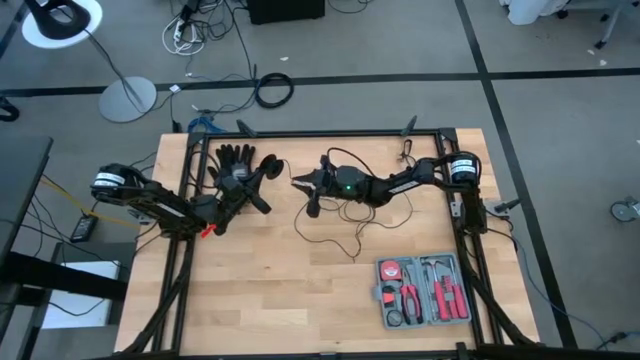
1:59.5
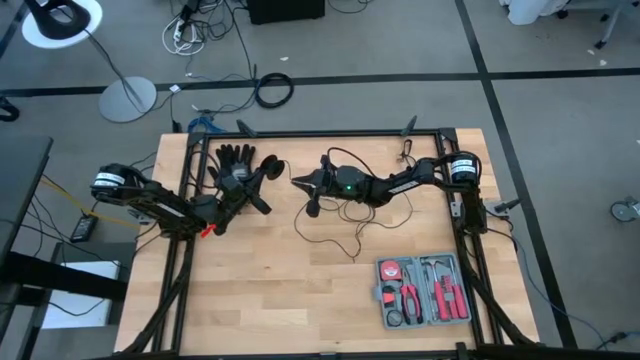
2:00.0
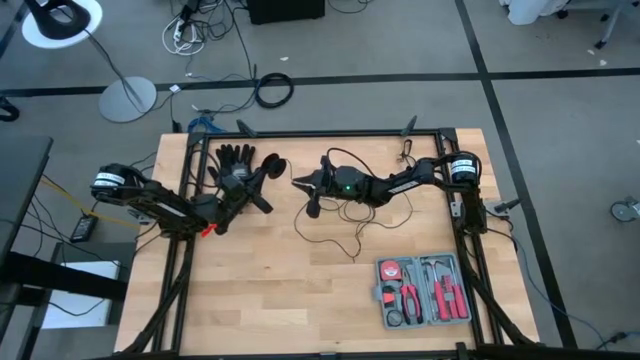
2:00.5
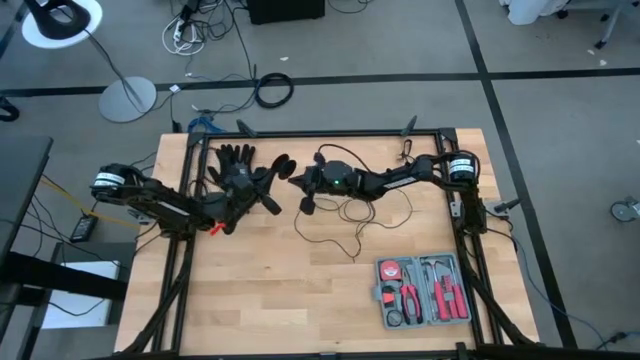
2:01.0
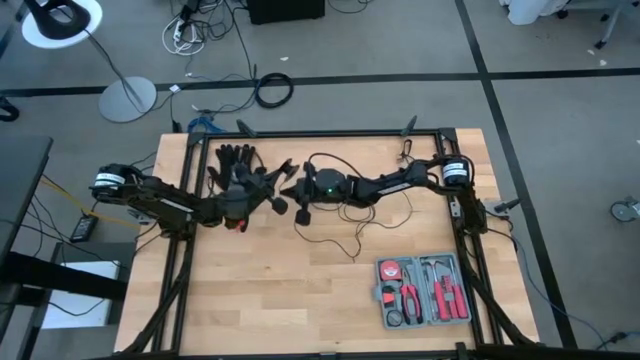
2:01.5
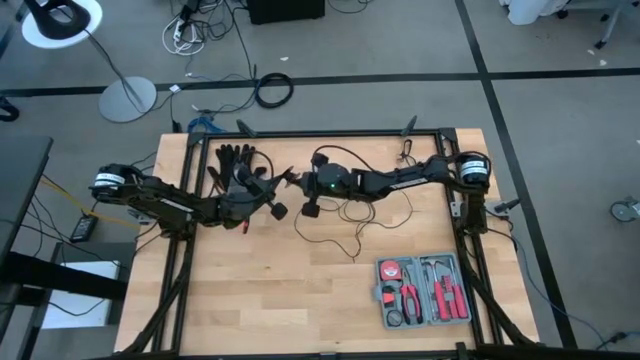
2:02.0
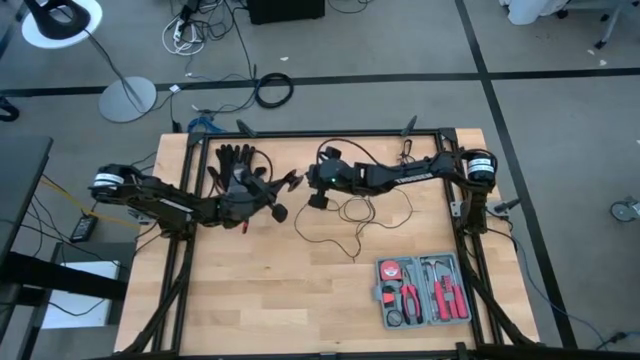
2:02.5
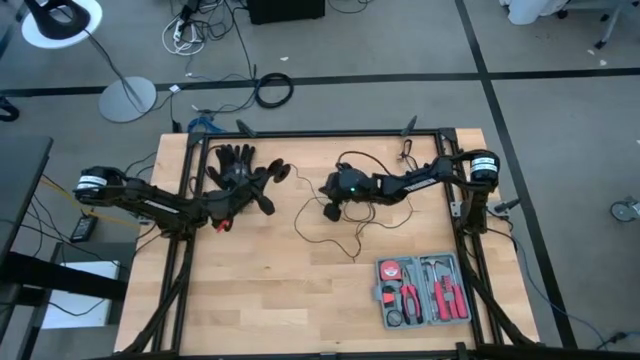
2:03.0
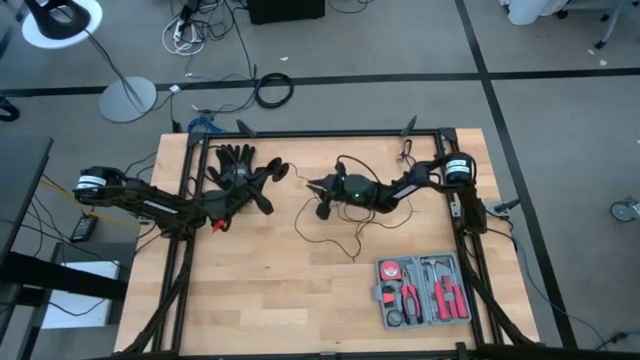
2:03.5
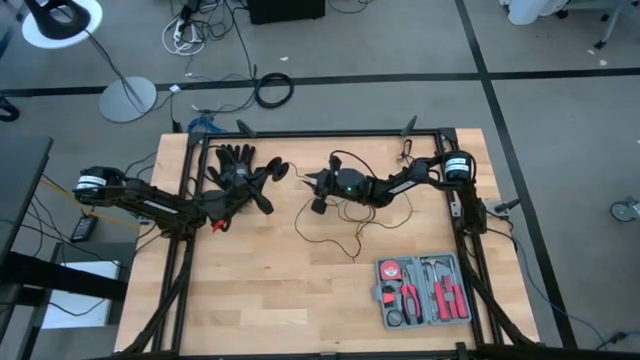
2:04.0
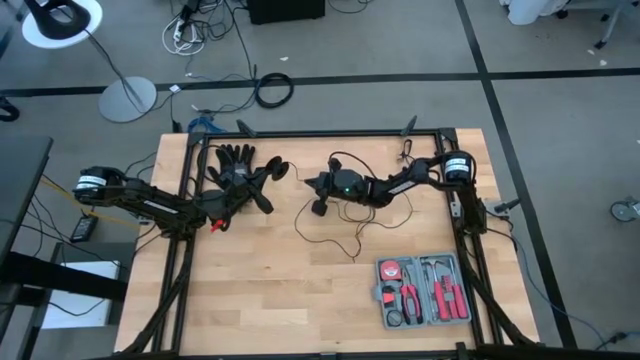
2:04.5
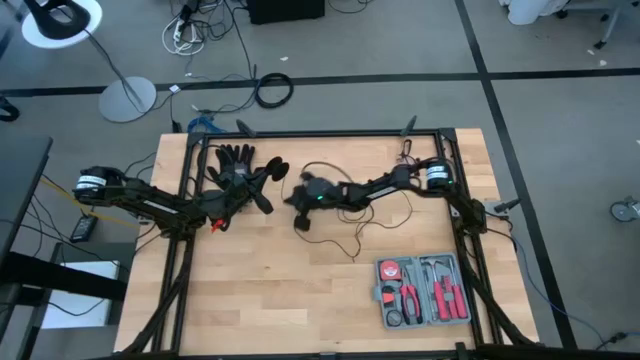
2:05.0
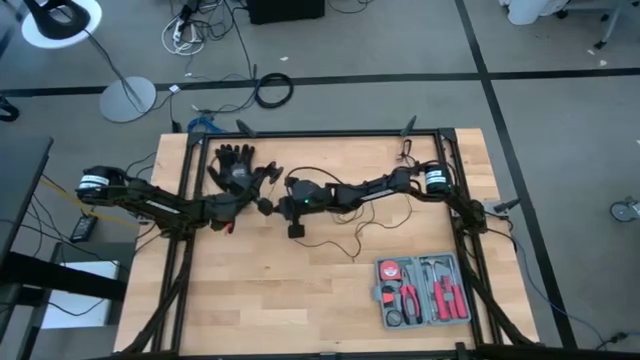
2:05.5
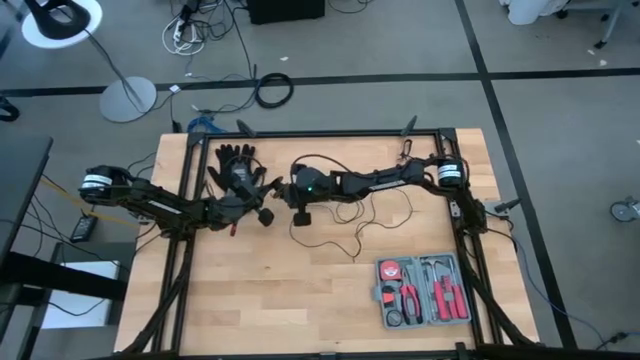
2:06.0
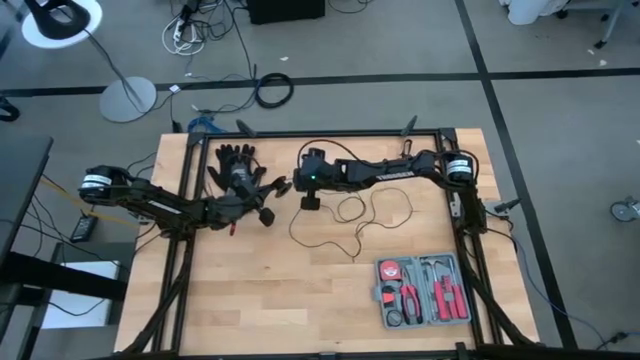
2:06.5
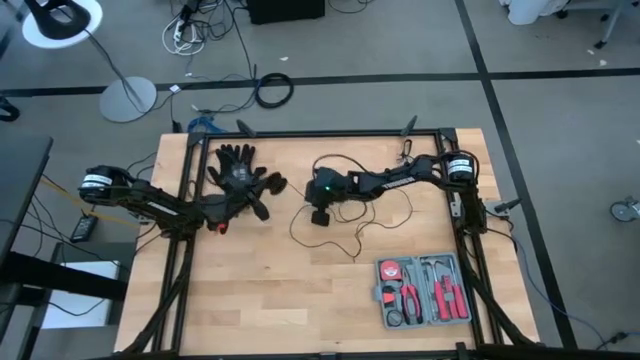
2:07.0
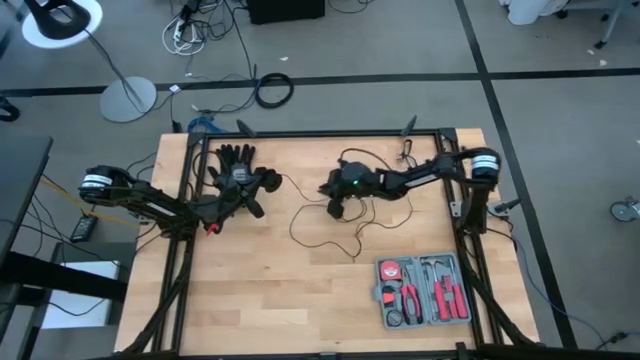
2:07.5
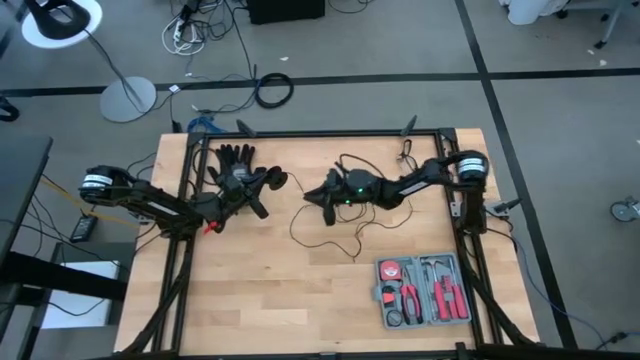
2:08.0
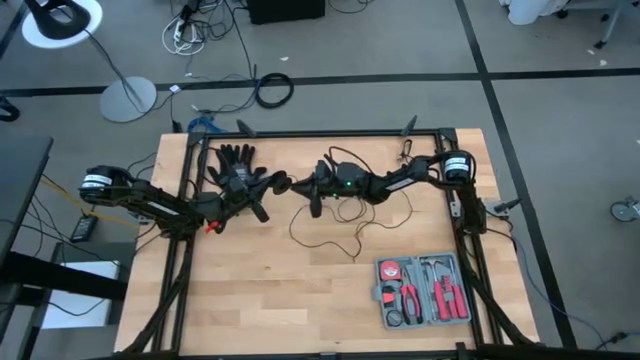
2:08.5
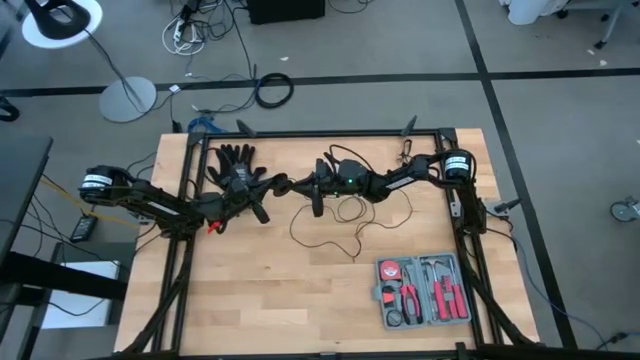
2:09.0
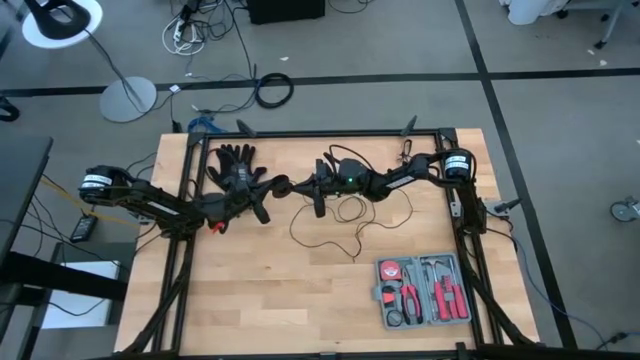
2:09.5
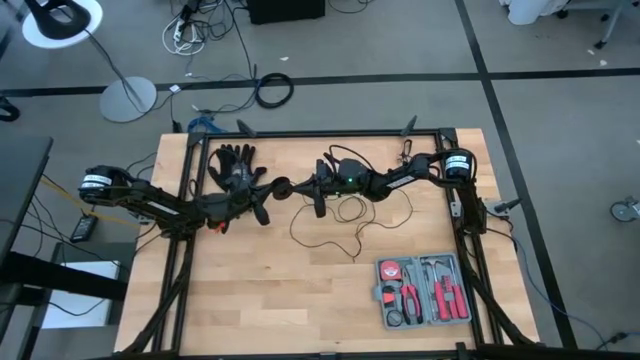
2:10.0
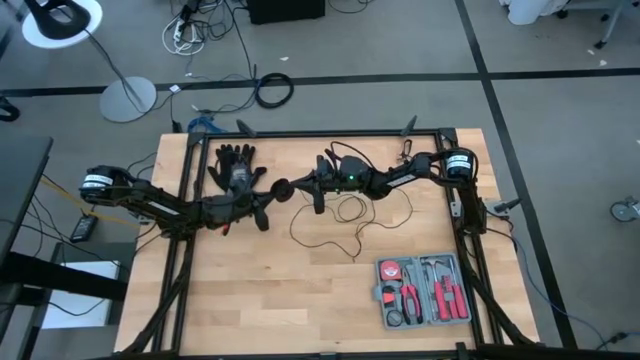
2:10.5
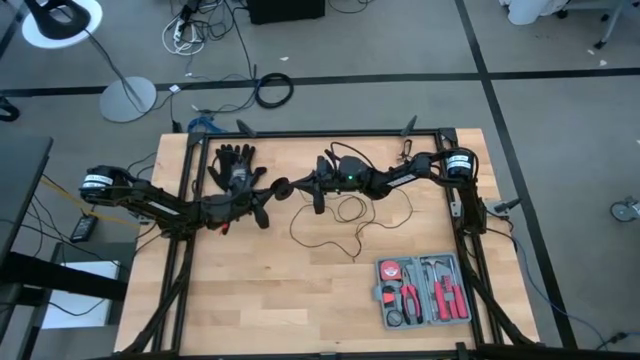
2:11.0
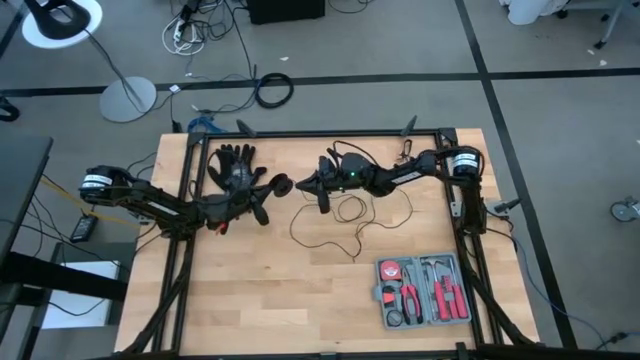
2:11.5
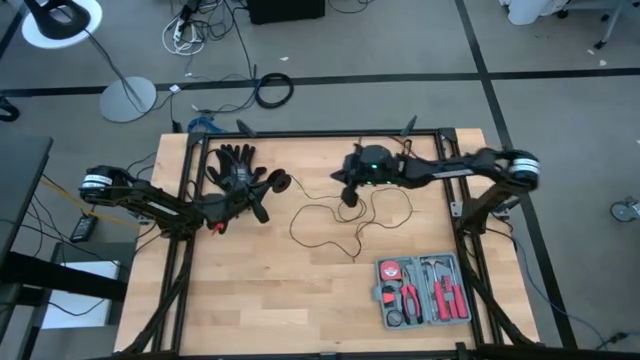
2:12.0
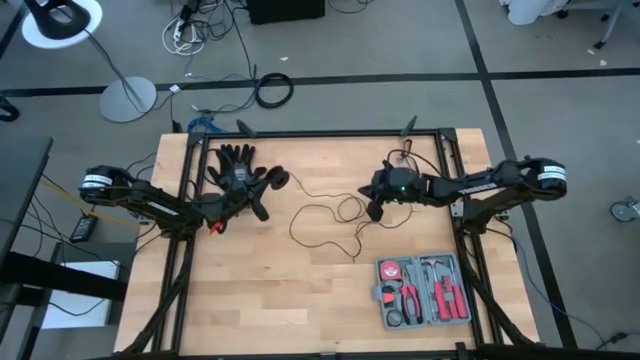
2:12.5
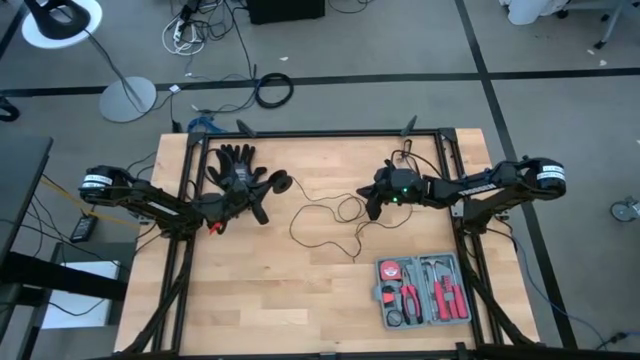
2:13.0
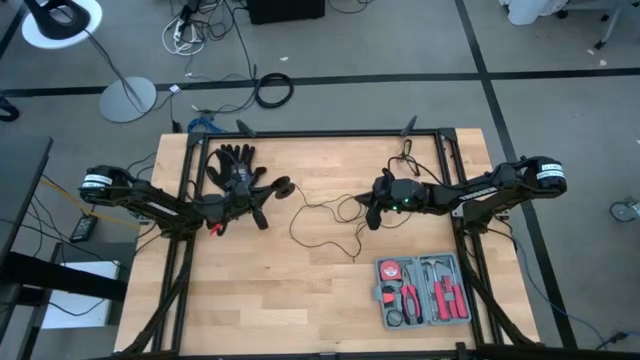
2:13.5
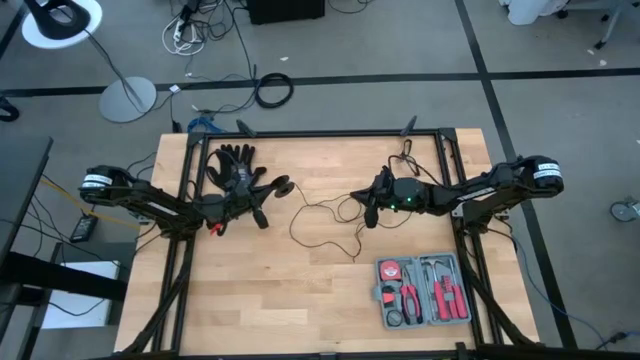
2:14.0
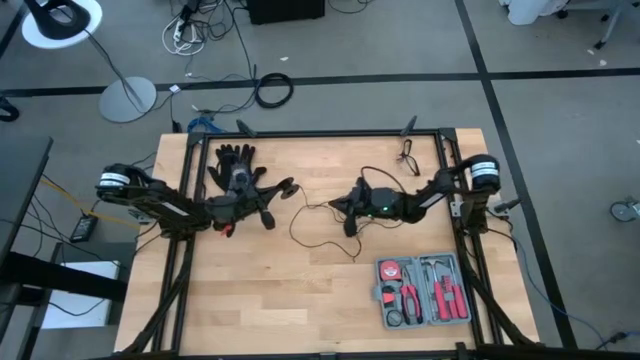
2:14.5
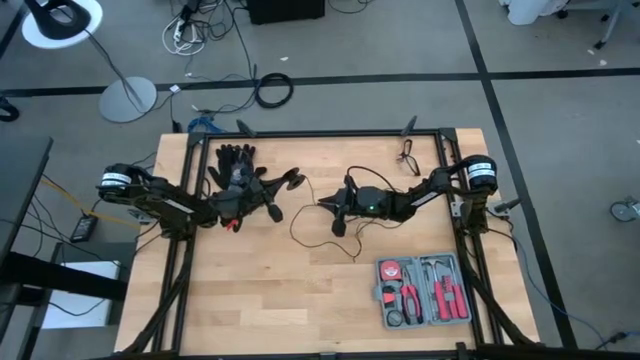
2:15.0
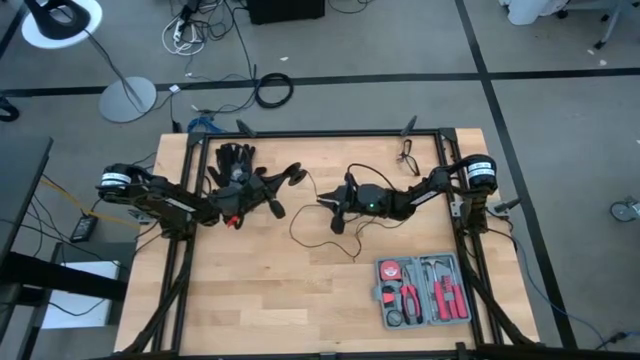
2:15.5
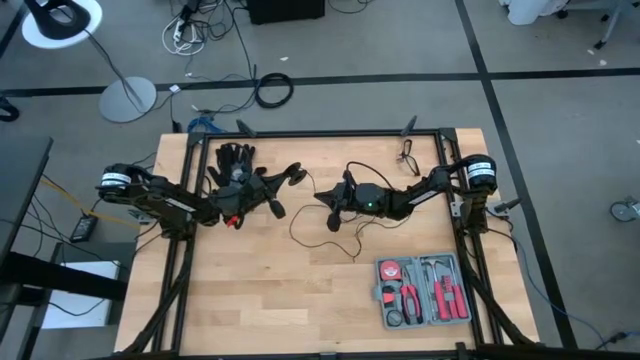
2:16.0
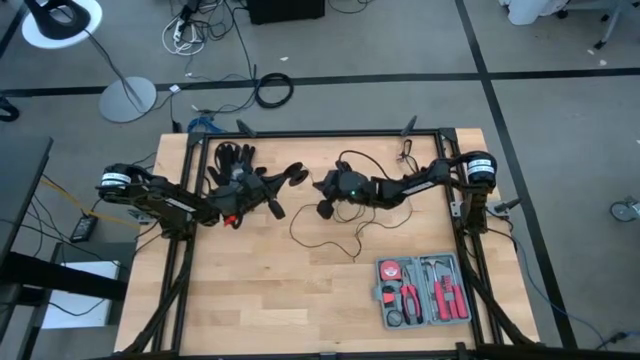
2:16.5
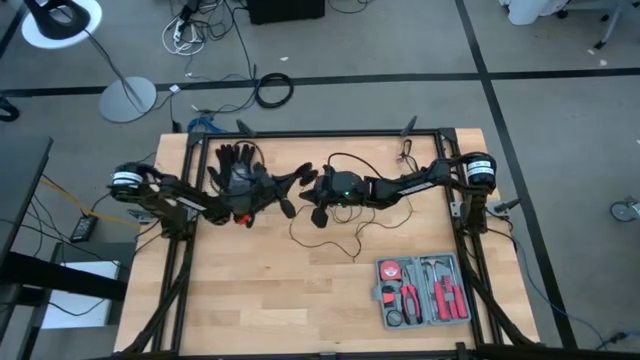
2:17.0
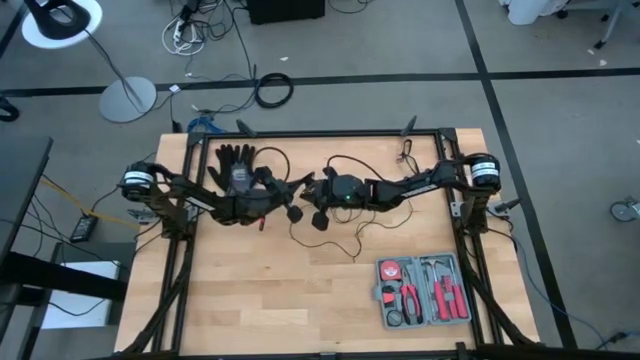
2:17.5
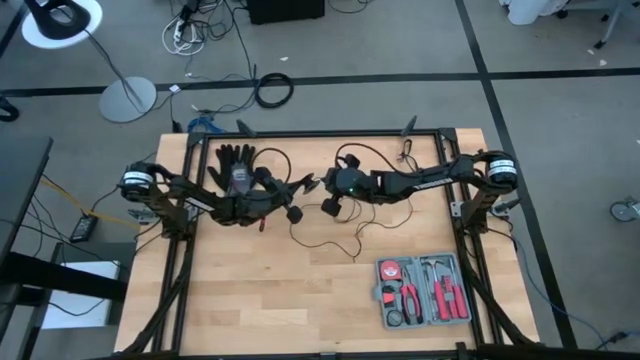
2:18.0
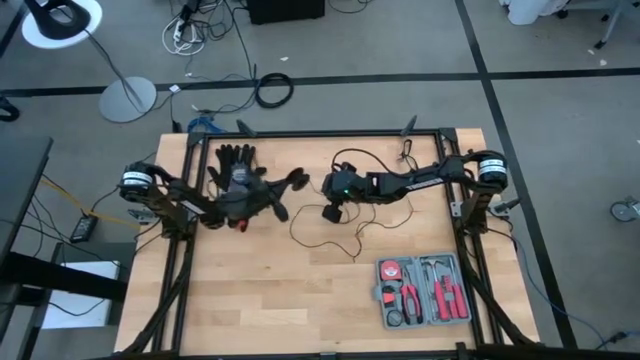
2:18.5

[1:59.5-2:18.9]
Task: Coil cords
Coil the black wire

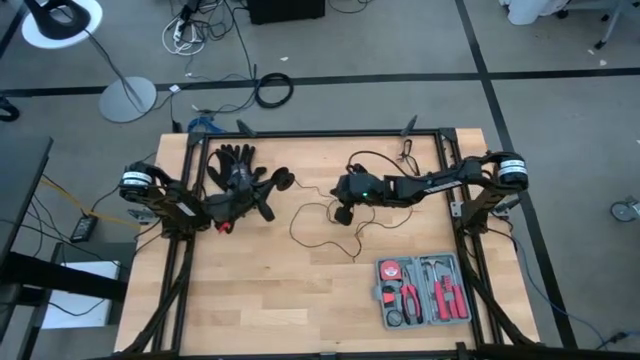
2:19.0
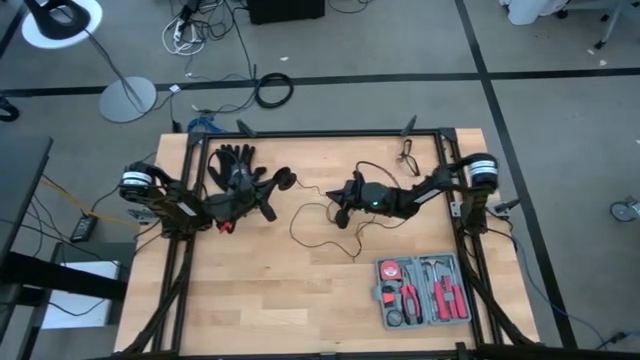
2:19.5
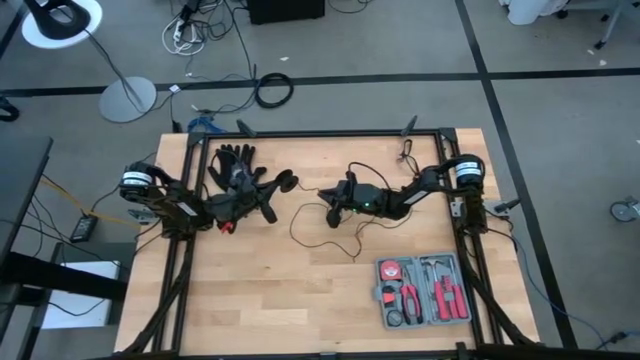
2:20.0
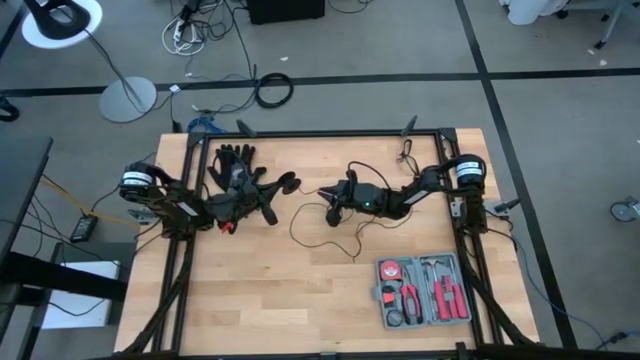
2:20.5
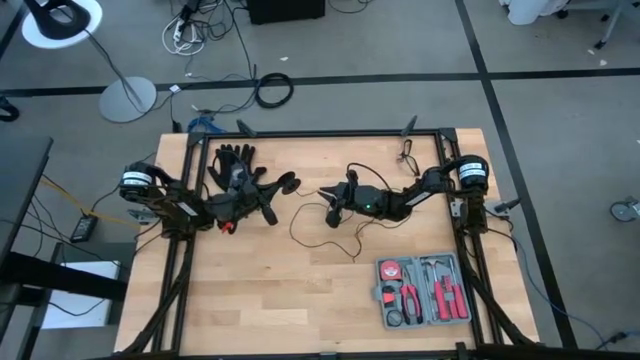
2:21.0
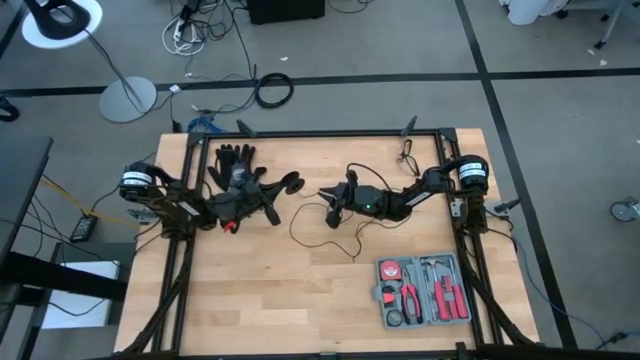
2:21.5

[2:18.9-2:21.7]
Coil the black wire
